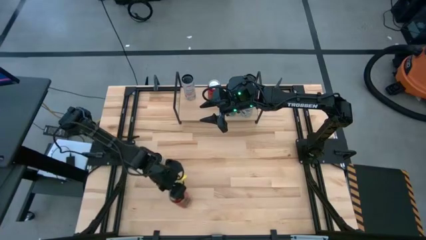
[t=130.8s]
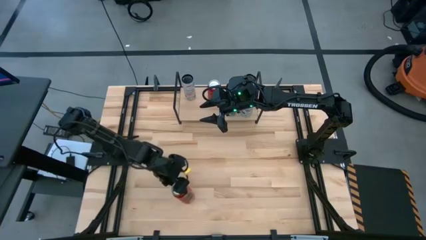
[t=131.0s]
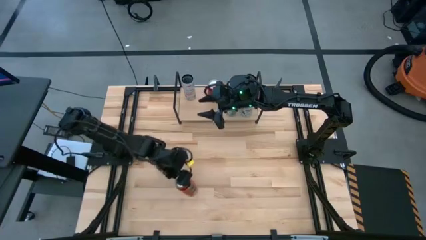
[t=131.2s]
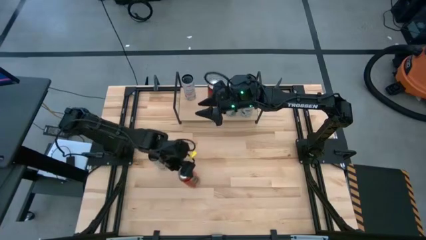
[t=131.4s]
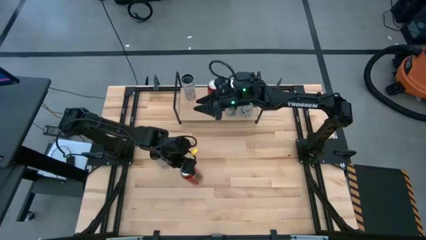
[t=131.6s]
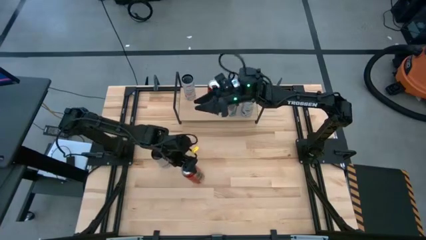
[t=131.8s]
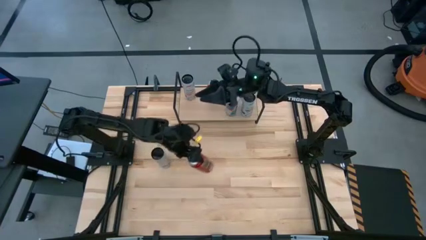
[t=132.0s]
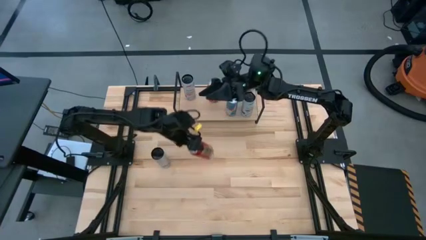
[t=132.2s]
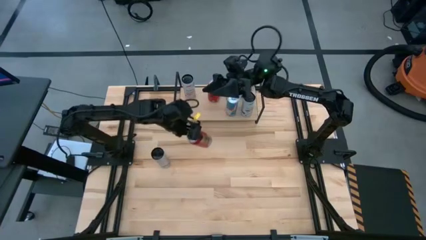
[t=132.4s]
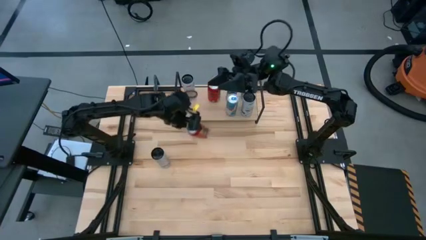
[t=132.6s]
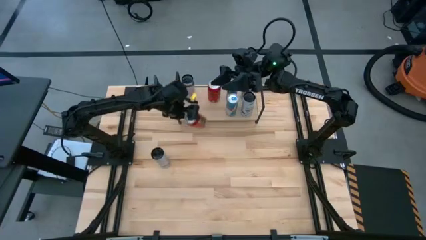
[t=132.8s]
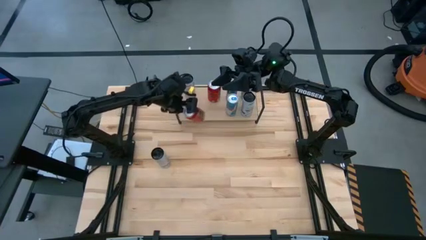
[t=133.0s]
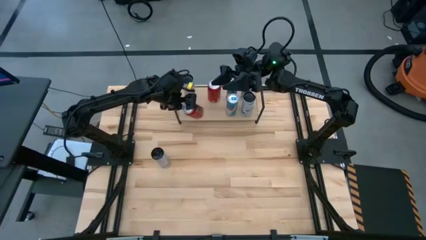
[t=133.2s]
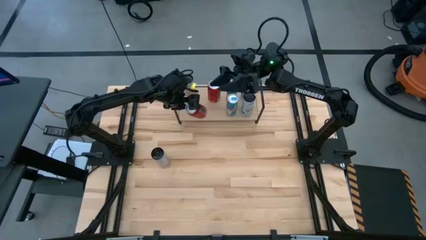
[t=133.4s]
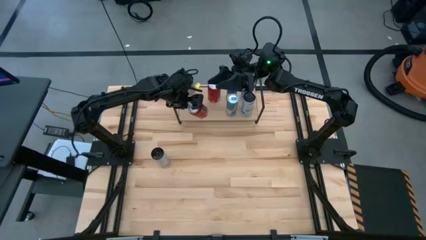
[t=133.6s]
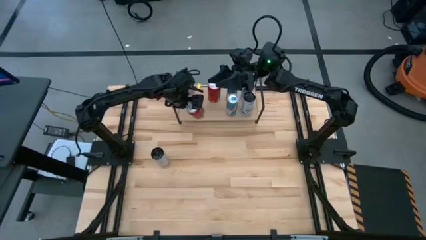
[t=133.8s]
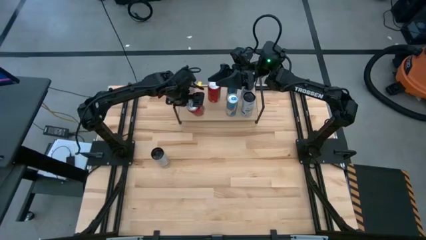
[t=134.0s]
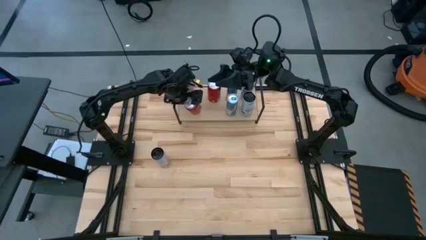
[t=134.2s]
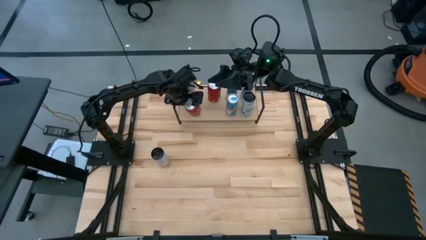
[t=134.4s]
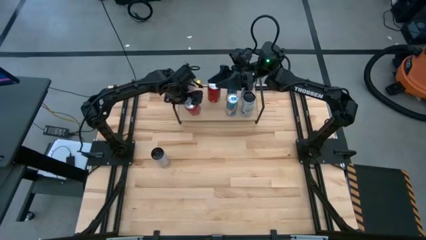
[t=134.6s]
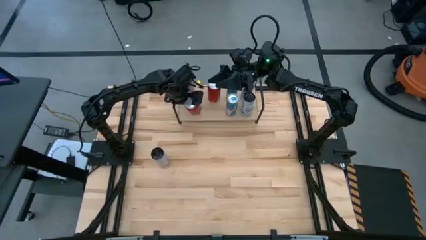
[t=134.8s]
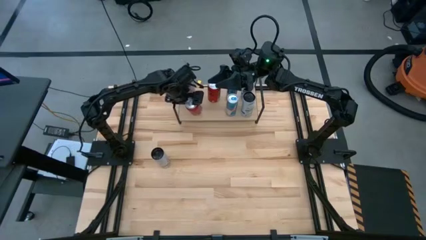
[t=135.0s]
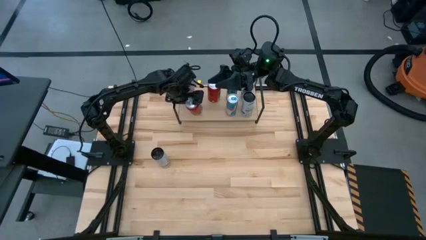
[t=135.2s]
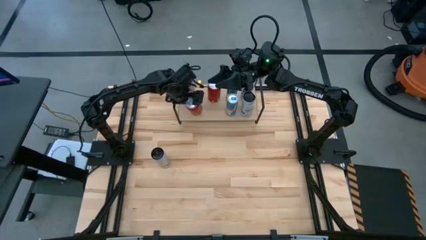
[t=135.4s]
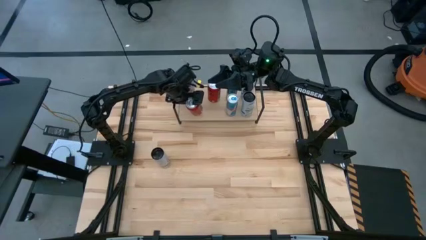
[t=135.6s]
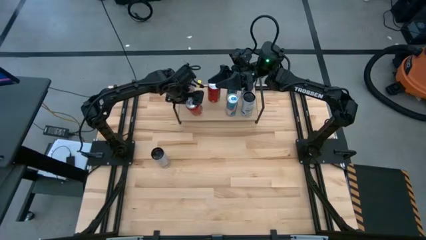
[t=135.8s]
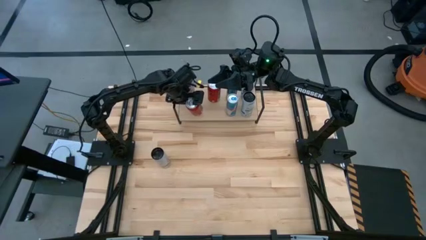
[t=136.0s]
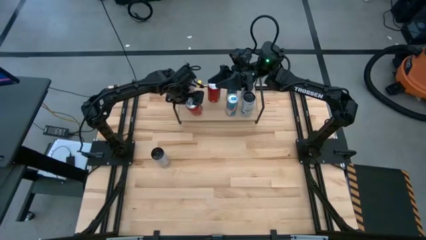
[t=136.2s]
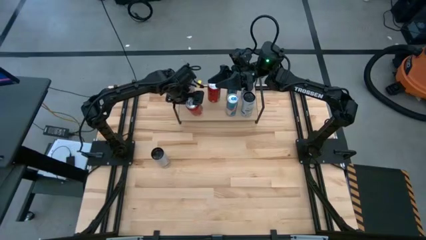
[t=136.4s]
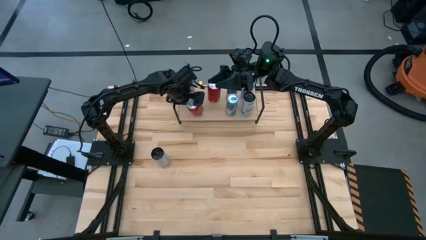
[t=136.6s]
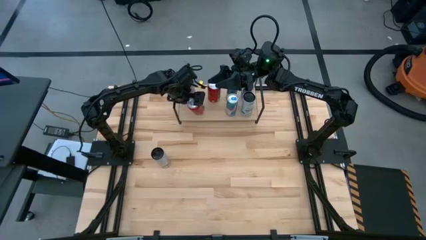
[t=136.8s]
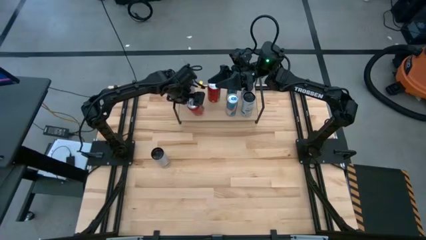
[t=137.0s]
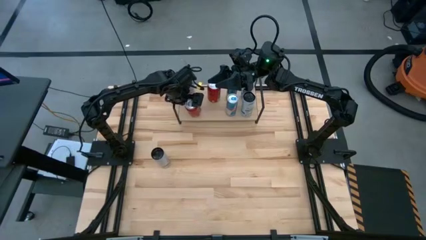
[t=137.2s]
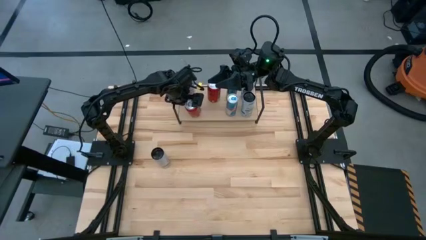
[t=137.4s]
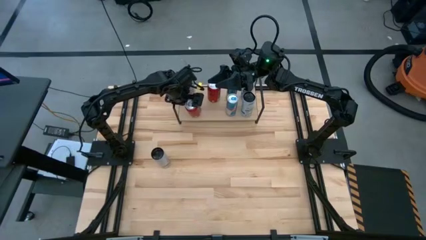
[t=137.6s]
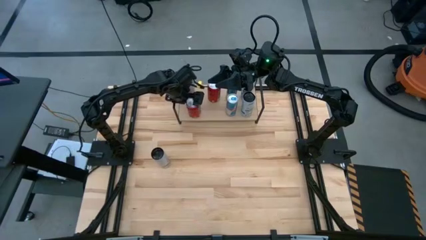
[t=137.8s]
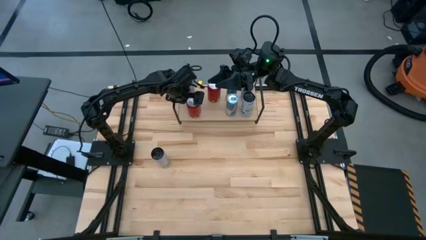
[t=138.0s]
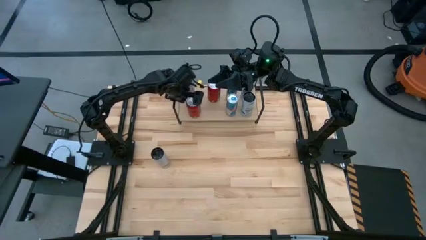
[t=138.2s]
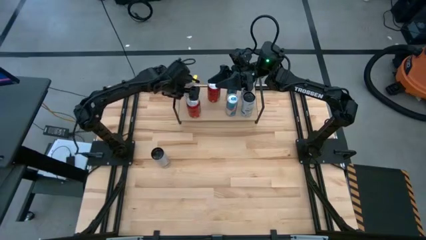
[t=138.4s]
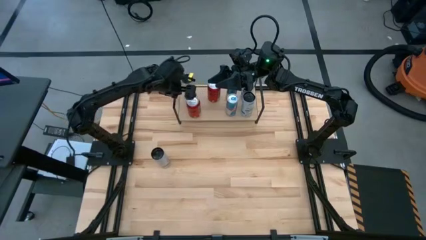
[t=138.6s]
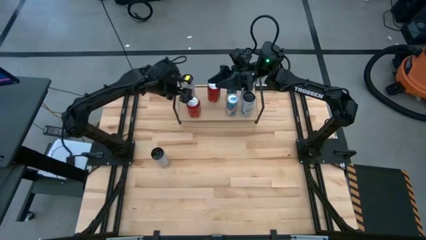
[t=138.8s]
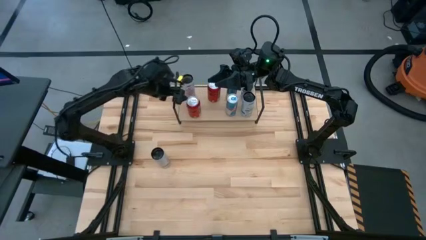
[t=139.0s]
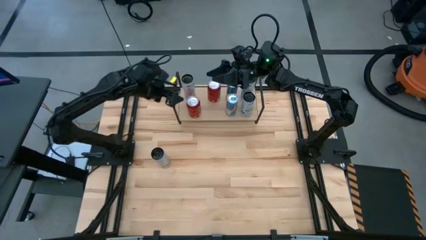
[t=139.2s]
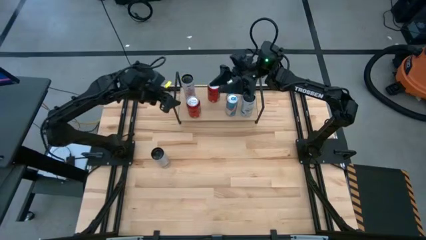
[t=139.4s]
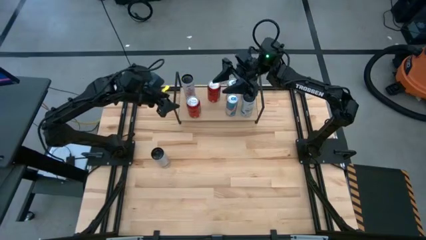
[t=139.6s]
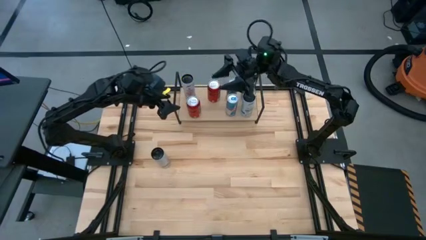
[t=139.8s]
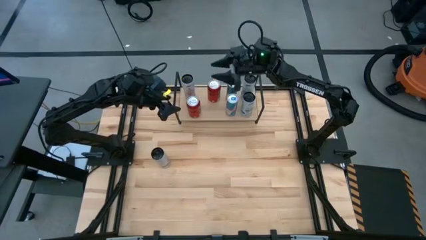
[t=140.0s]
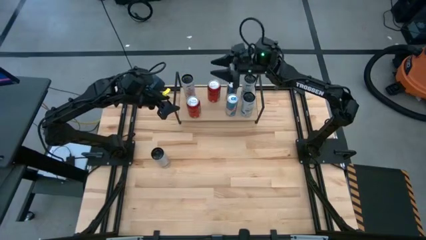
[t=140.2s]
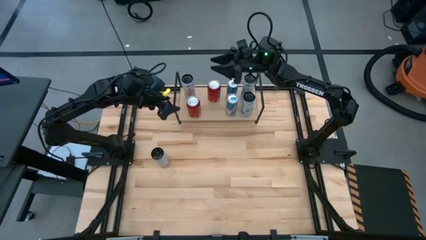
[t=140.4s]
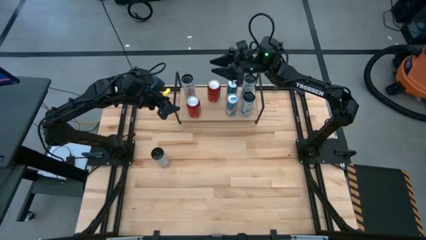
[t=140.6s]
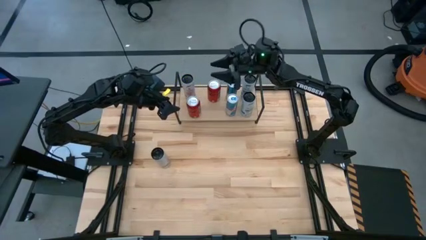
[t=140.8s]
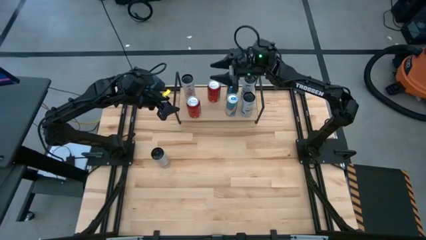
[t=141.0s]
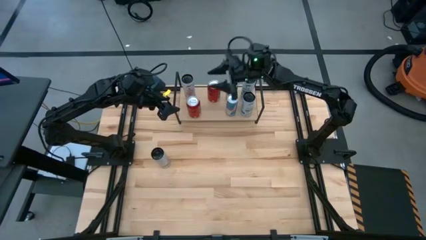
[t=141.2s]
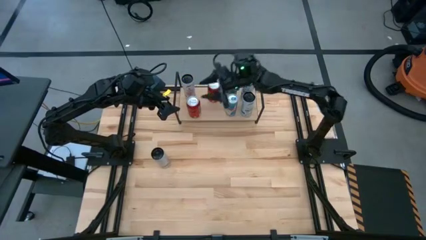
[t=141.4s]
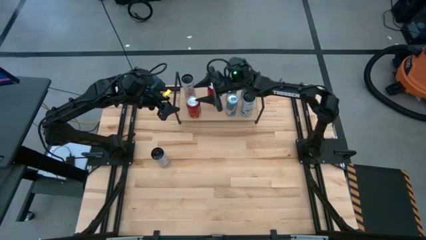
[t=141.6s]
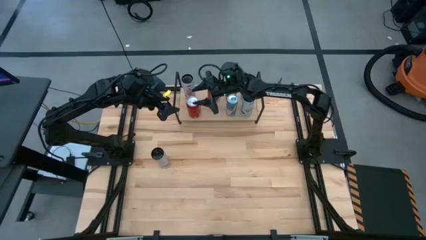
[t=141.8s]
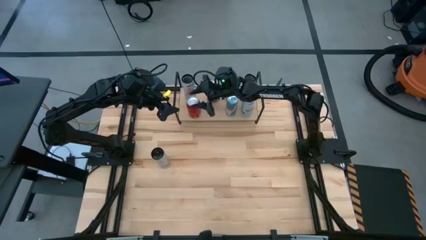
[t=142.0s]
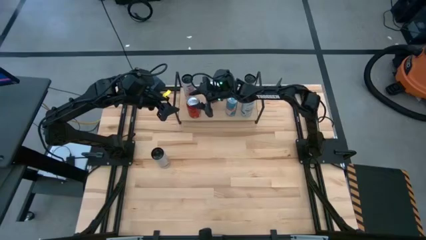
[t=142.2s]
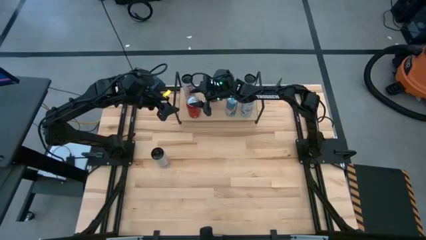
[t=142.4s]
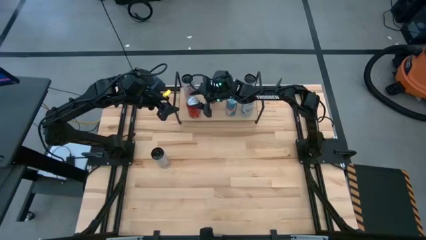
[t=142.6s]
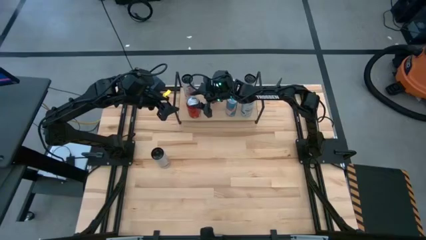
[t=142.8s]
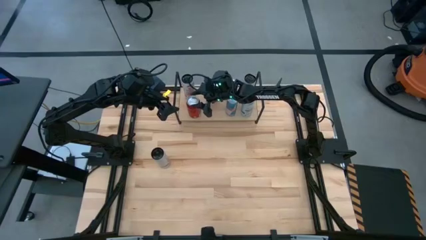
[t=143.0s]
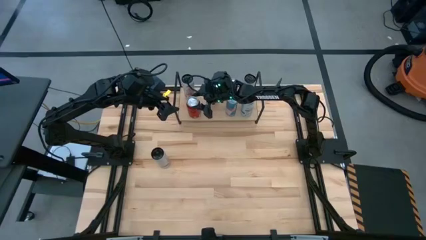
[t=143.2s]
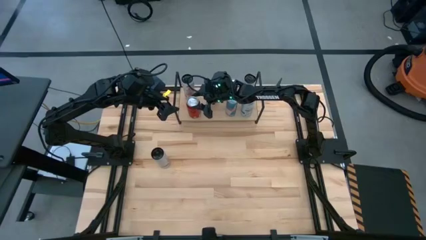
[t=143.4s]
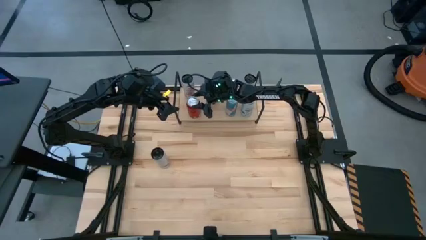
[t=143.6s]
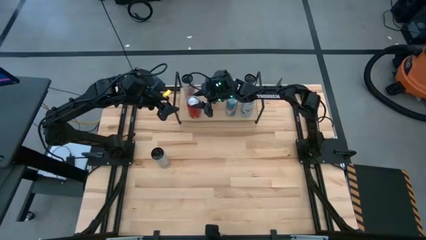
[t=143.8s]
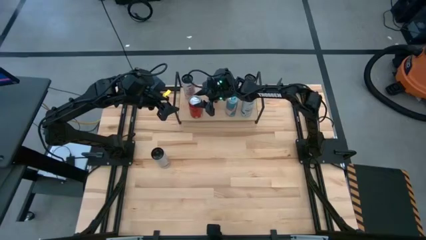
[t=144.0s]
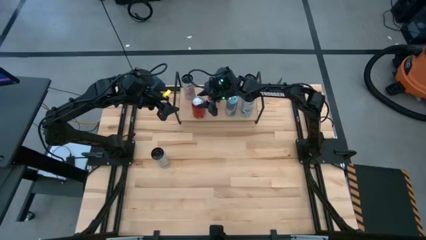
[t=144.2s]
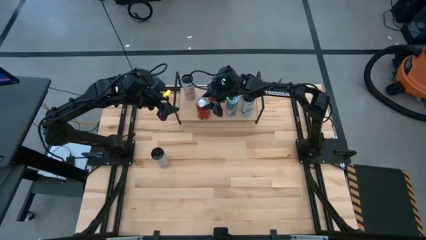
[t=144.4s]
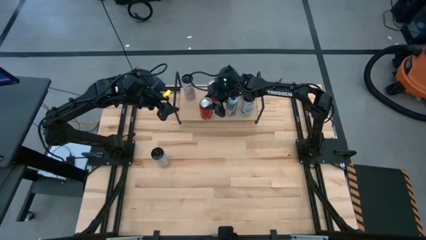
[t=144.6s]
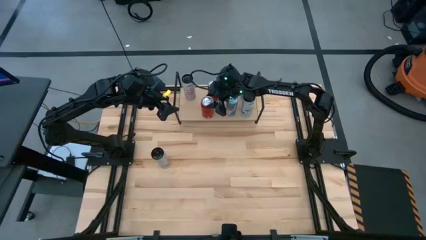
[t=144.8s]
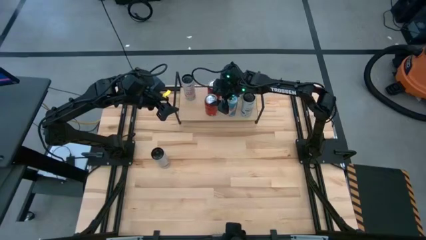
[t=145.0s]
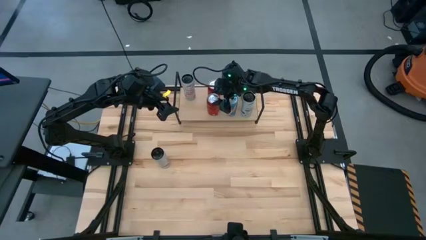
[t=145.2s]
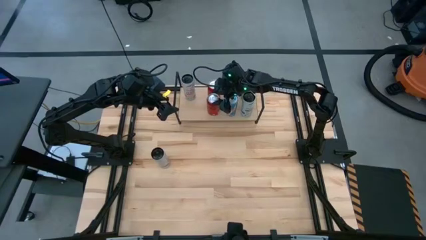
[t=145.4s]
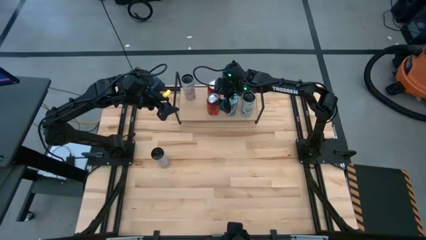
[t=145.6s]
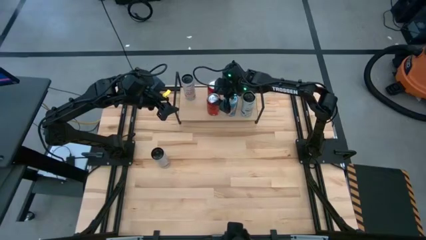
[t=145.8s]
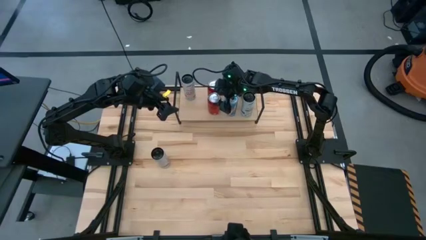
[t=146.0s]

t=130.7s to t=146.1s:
Task: Place canned beverage on shelf
Put the red soda can on the shelf aligned with other red soda can

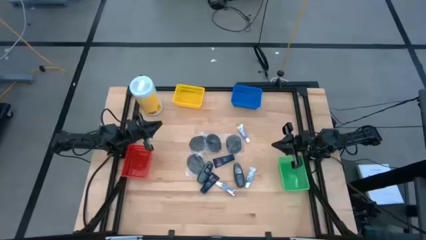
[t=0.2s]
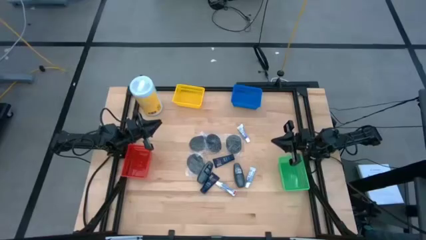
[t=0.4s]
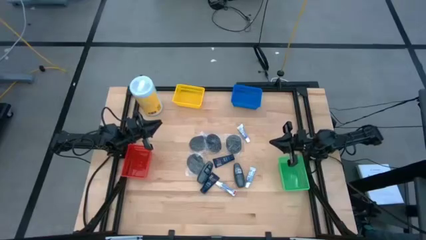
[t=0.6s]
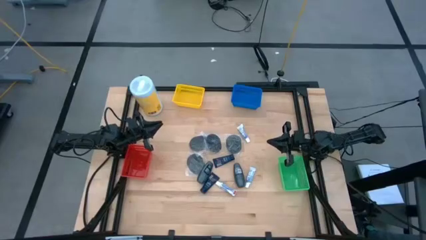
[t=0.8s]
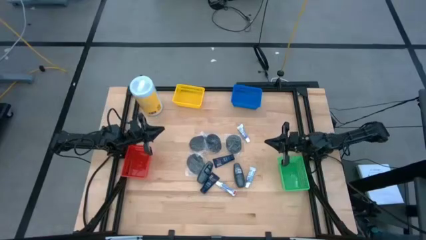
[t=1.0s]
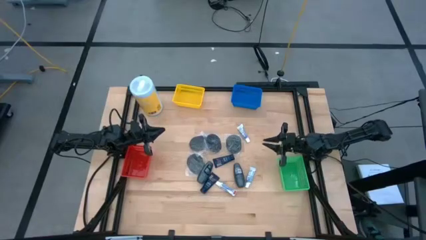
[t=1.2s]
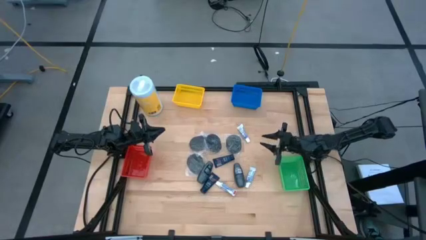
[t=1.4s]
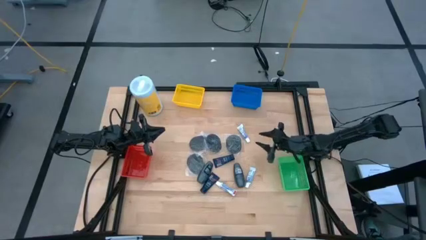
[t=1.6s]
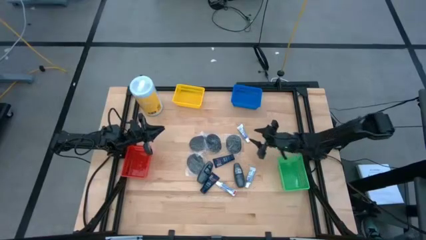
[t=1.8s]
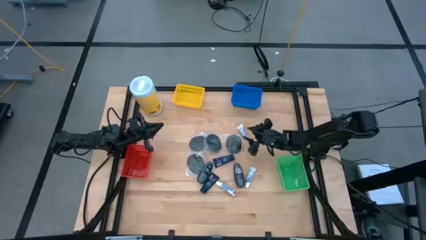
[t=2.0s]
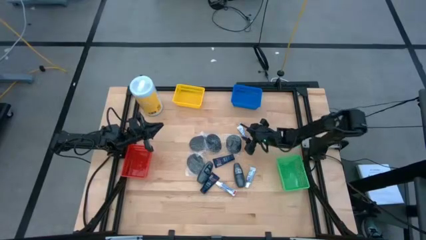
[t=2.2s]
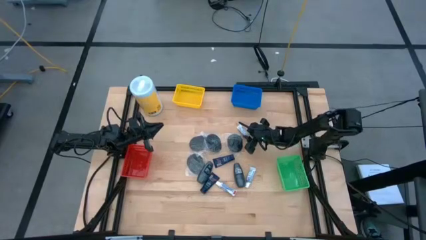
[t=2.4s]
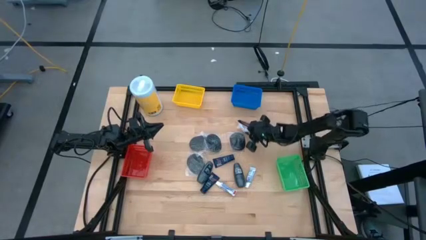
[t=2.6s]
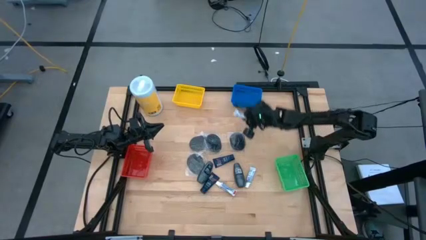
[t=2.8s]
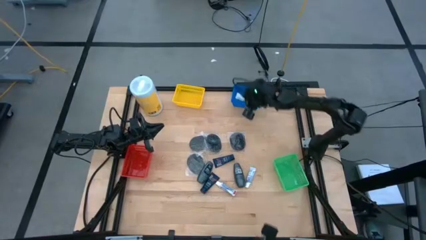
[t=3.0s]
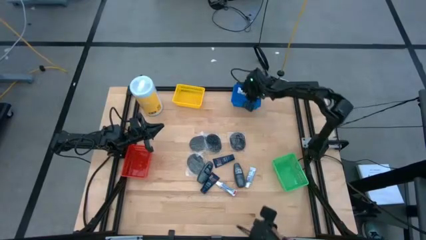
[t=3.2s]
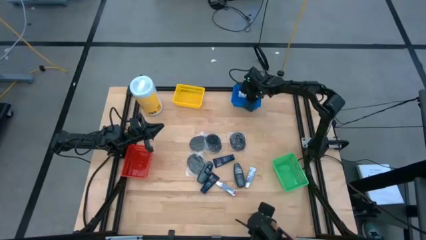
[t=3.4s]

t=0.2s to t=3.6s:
Task: Pick & Place Travel size toiletries
Put the purple toothpaste into the blue bin
